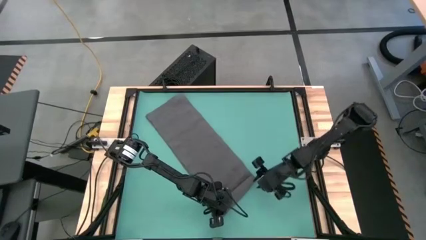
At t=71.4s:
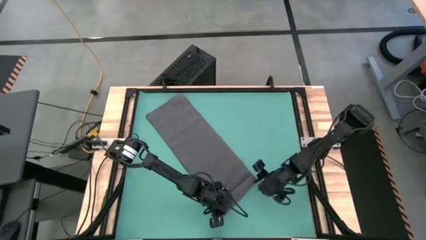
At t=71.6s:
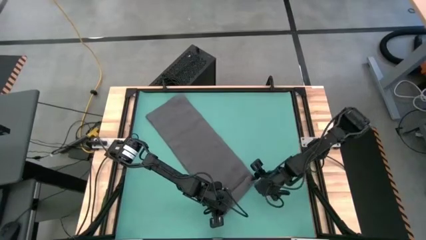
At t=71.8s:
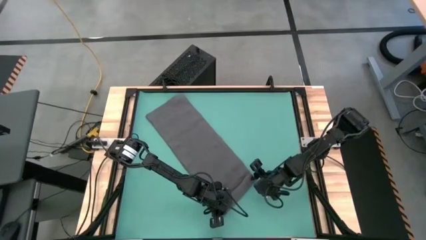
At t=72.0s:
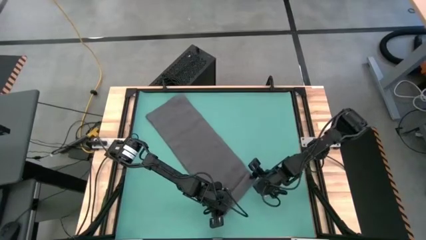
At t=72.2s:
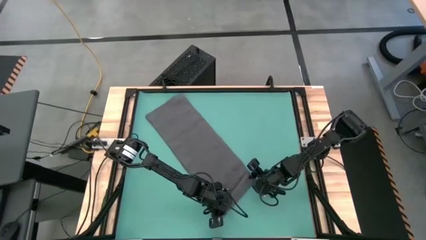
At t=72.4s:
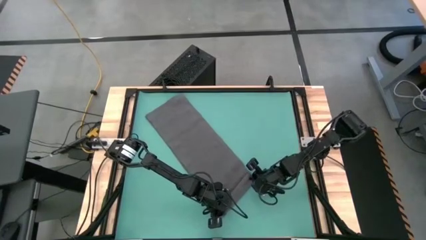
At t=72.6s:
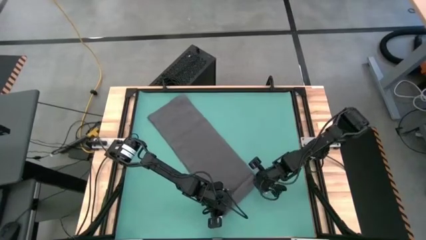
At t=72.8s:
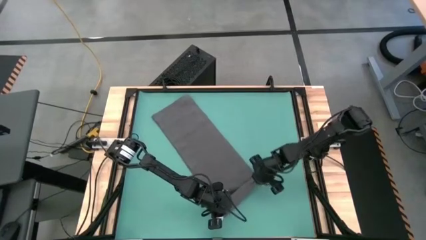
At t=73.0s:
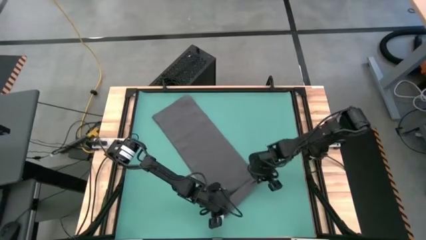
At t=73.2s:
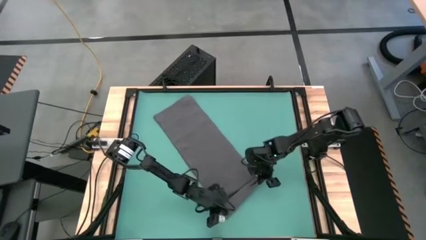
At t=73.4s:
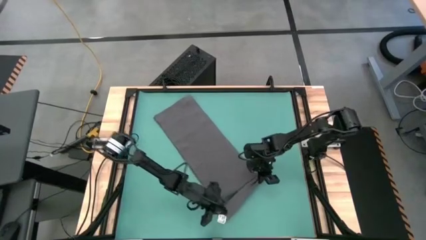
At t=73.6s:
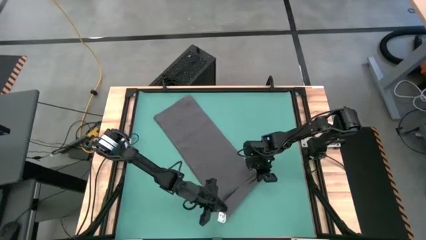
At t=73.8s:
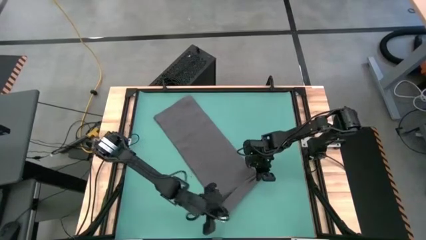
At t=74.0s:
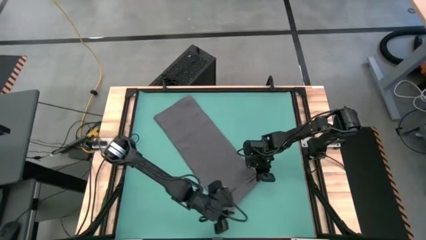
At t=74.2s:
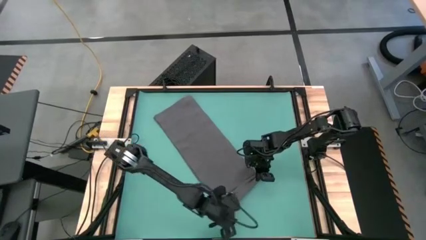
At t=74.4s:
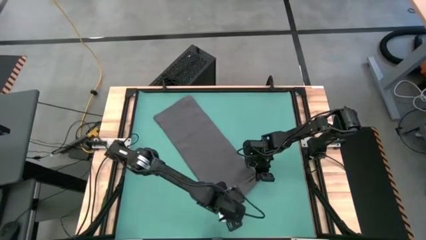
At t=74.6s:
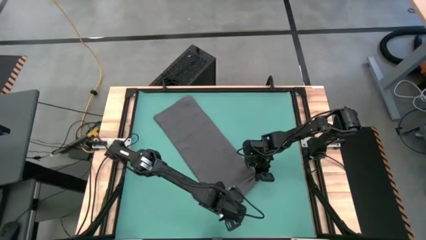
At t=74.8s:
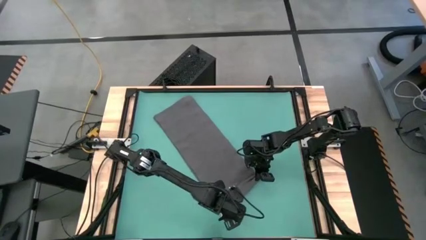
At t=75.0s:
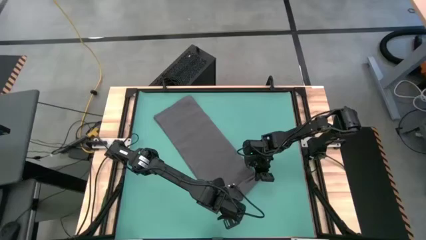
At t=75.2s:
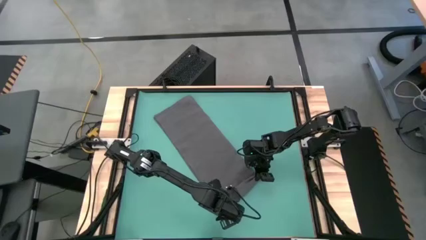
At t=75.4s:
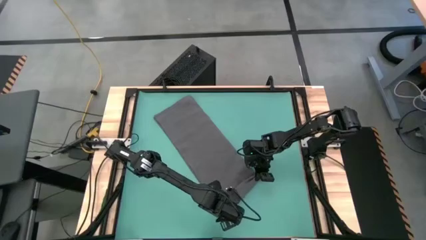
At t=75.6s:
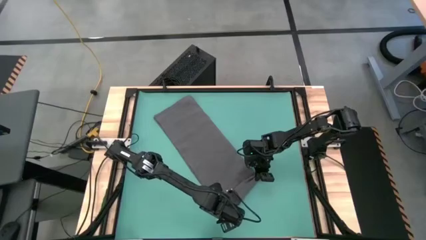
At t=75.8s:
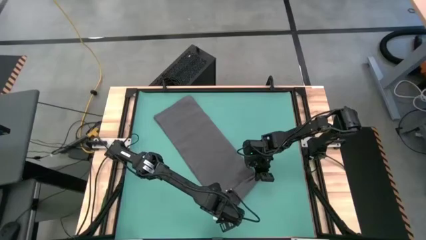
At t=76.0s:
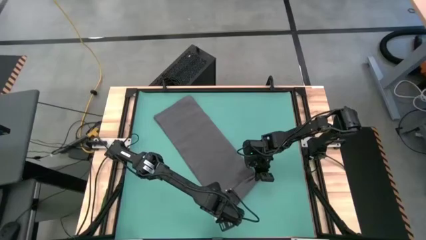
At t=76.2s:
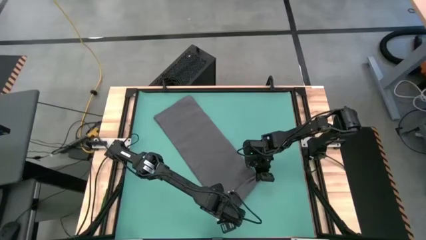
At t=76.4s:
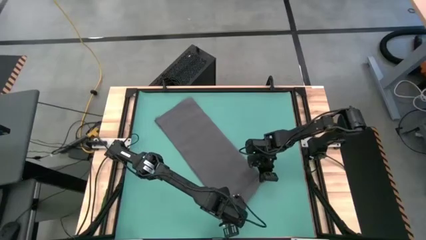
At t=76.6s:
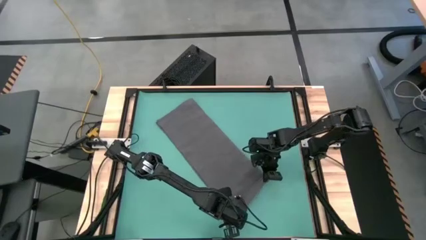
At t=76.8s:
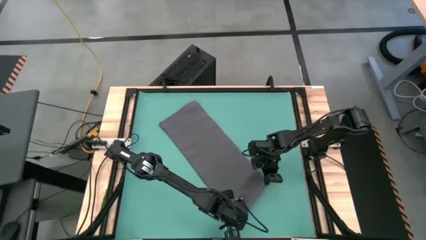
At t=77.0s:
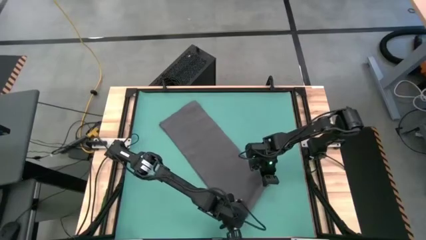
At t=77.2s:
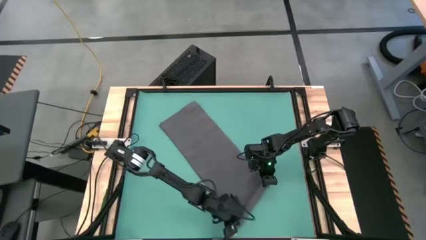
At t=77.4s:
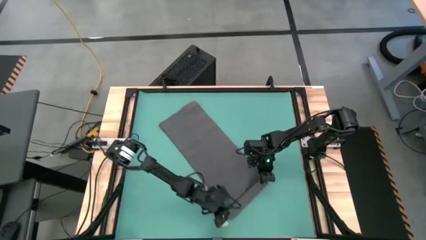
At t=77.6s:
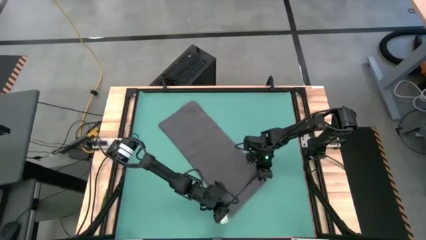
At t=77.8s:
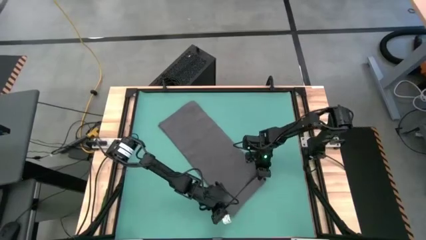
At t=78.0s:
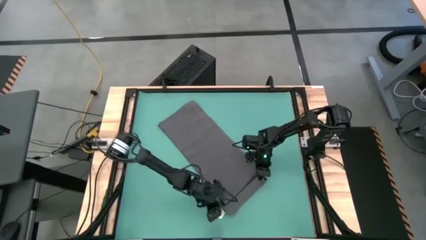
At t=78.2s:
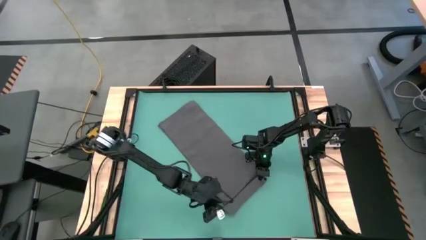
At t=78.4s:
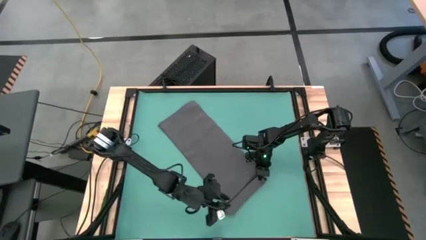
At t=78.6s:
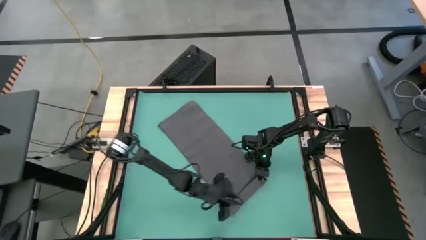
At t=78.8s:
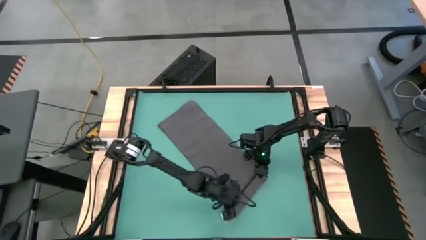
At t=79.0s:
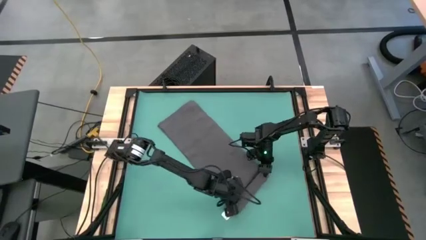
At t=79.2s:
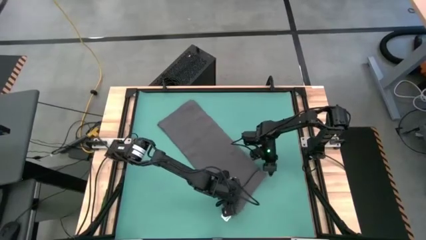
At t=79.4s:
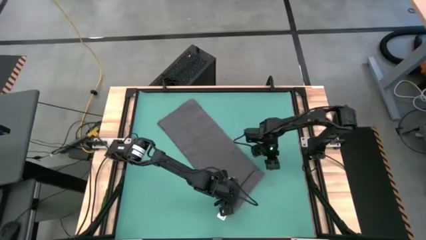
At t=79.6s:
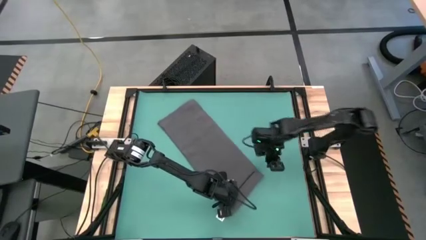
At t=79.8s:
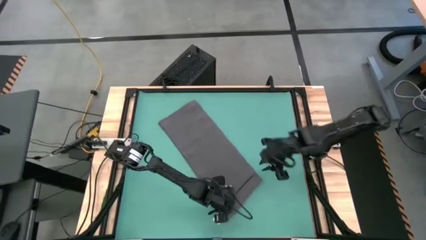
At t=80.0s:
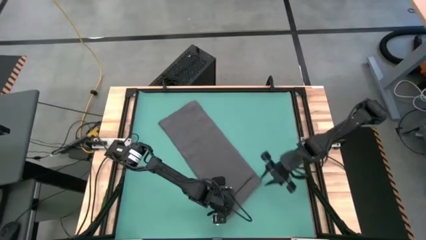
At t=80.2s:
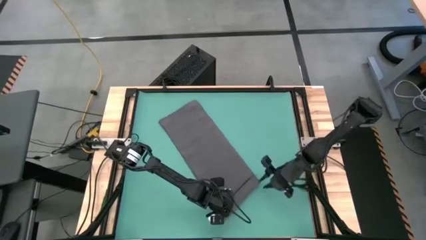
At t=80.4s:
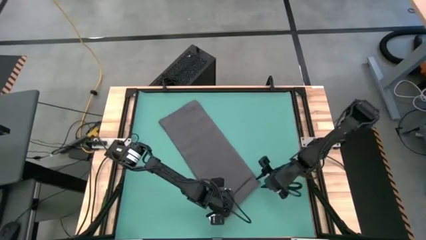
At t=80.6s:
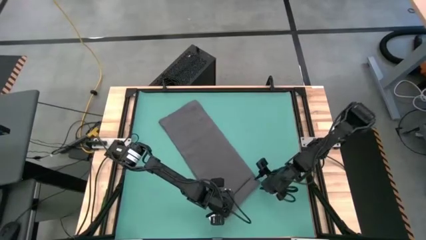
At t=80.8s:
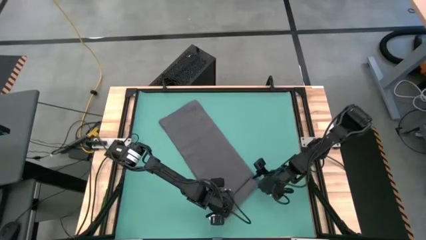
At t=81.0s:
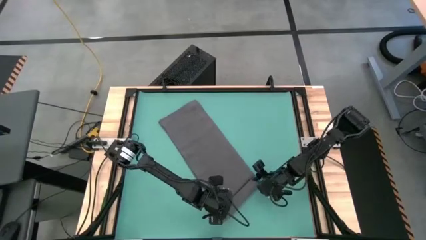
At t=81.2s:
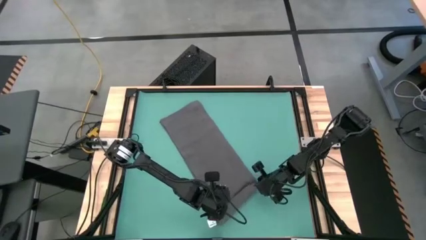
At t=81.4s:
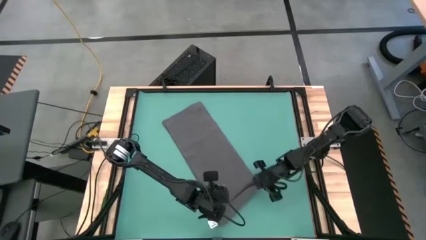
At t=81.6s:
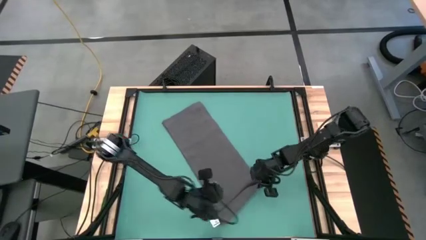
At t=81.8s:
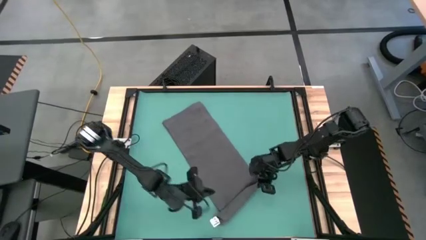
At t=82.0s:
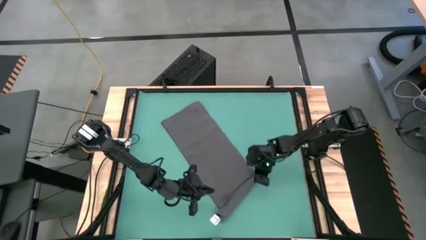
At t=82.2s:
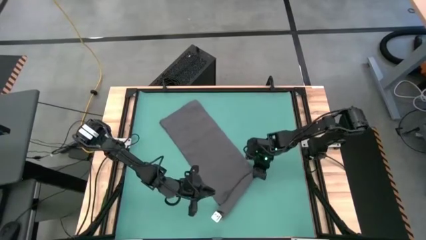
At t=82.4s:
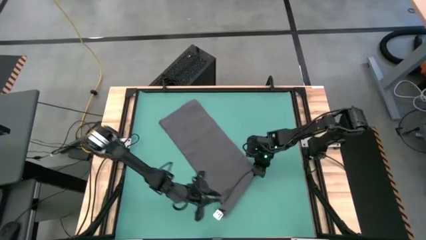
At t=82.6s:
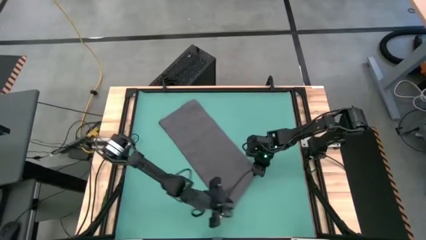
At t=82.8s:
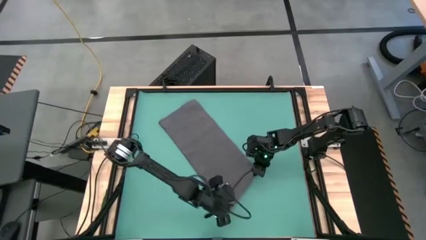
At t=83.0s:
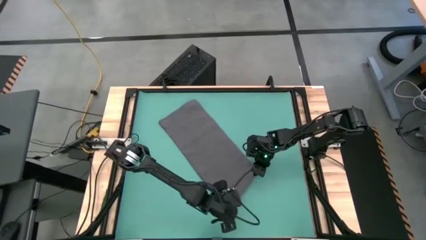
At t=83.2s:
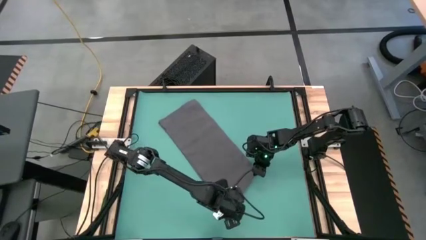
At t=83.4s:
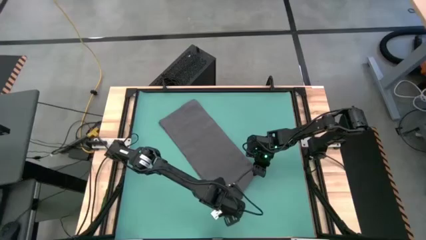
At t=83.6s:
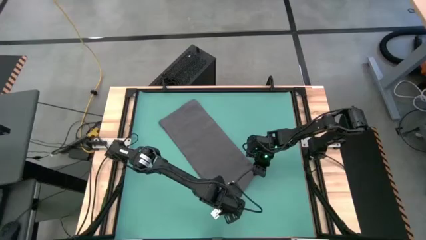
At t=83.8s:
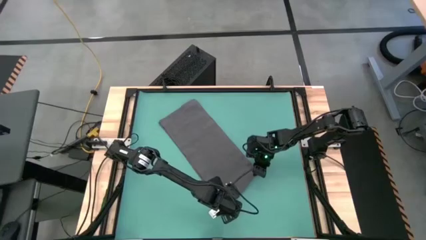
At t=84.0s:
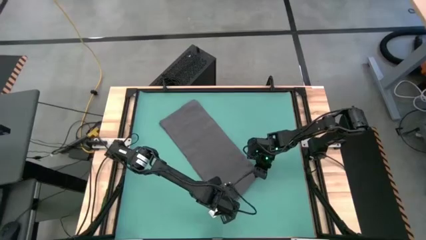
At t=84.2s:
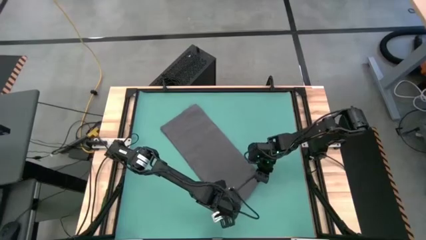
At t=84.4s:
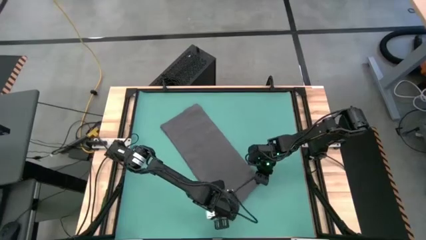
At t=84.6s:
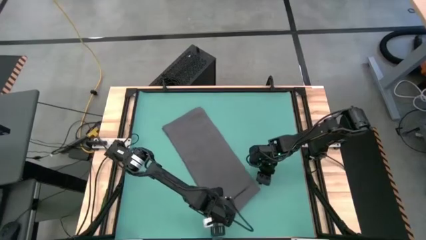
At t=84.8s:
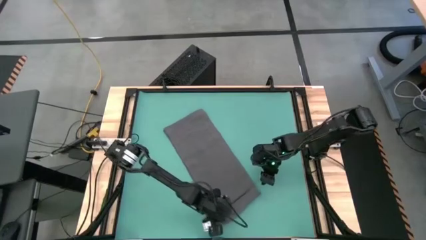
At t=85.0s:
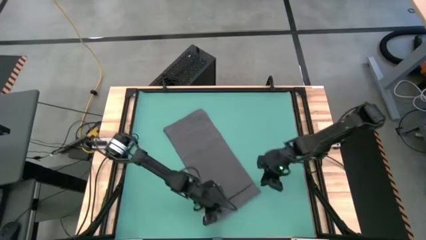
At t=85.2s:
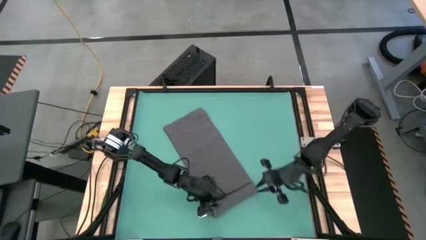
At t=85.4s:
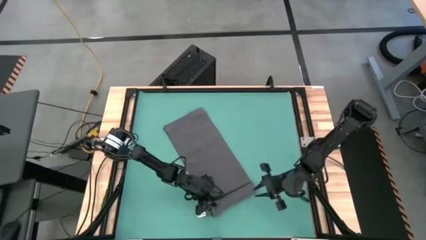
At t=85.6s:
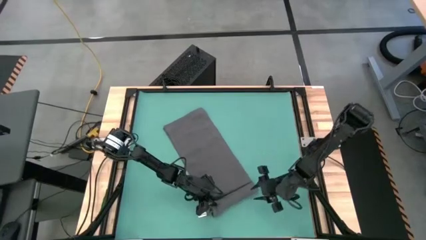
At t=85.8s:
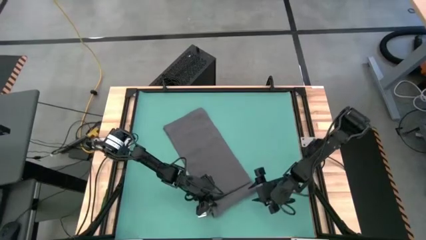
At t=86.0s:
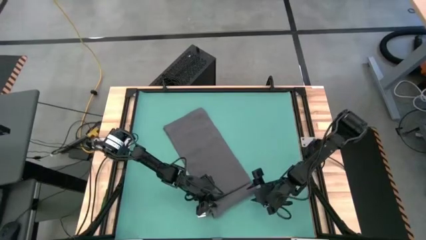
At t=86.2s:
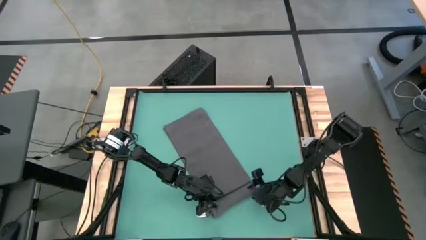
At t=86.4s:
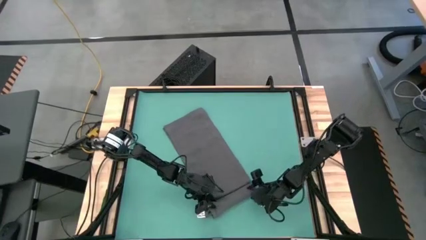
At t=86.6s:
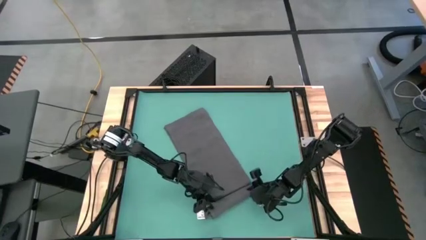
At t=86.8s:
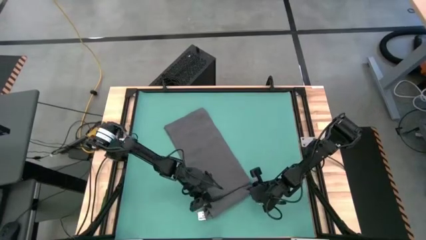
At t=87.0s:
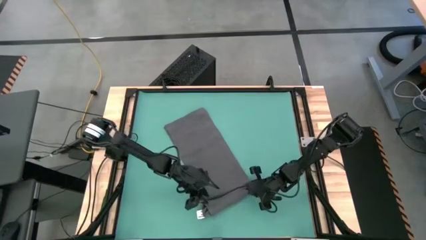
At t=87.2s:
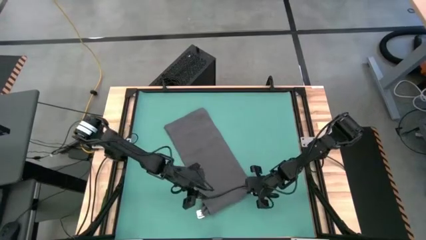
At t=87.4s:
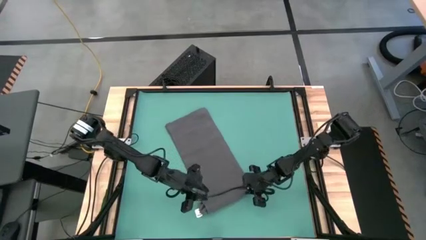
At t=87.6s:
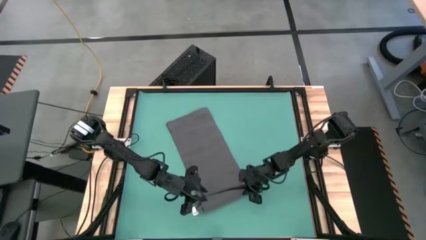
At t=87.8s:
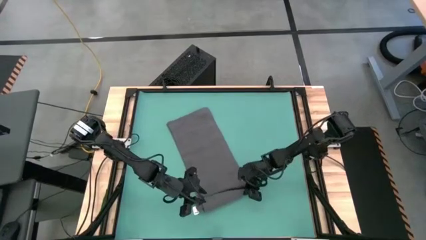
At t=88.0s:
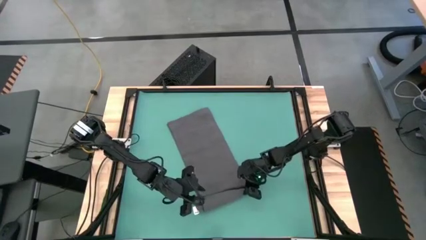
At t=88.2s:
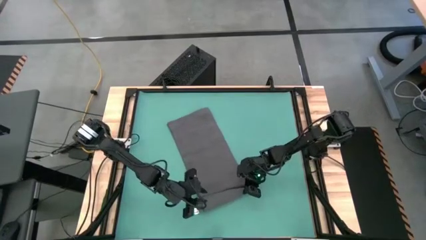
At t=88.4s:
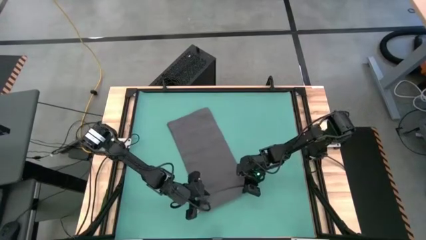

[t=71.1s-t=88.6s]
Task: Roll towel into tight, uniform cylinder
Roll the gray towel
